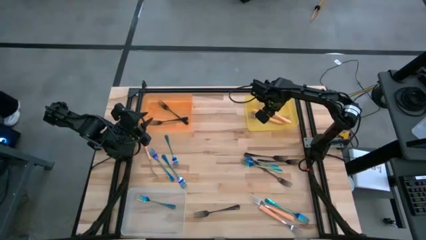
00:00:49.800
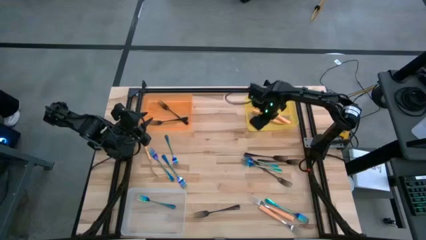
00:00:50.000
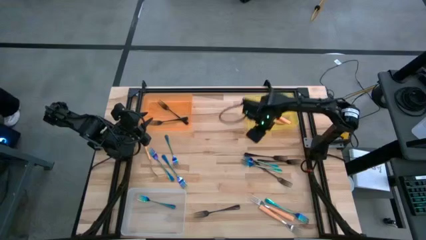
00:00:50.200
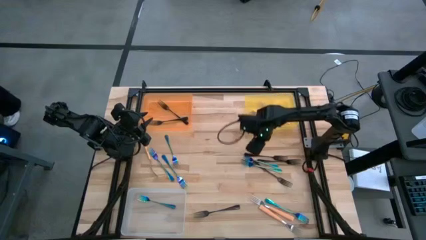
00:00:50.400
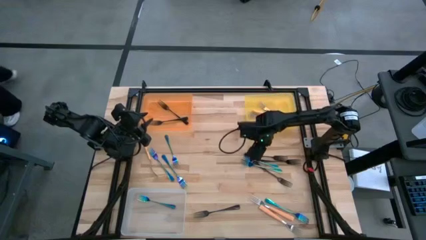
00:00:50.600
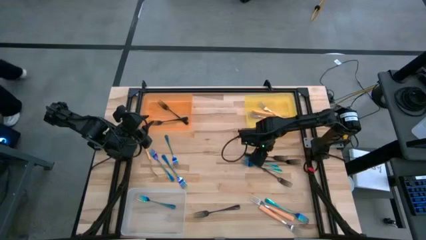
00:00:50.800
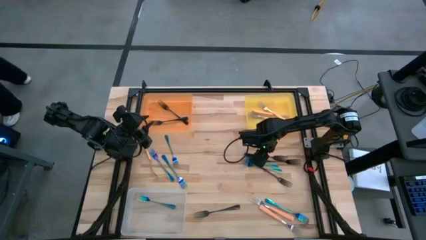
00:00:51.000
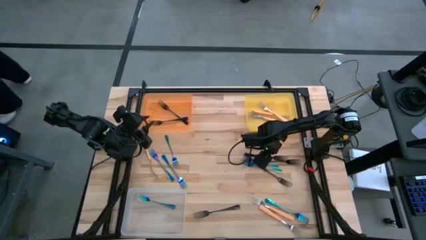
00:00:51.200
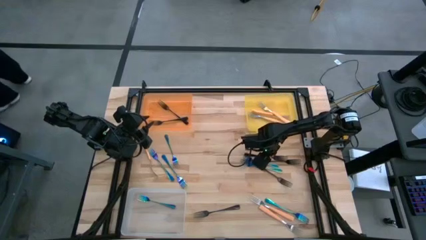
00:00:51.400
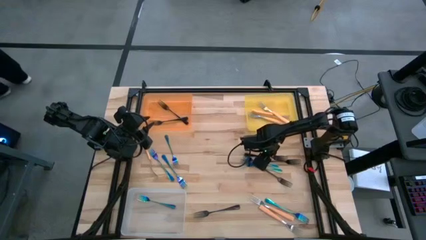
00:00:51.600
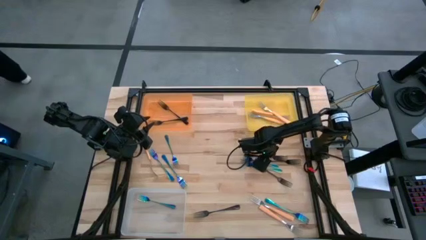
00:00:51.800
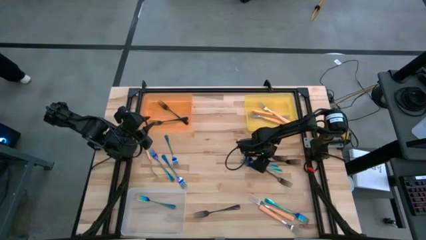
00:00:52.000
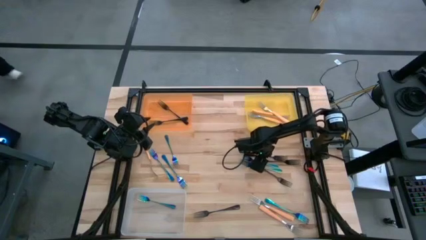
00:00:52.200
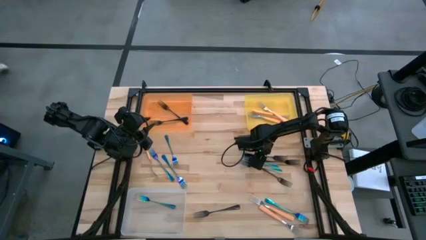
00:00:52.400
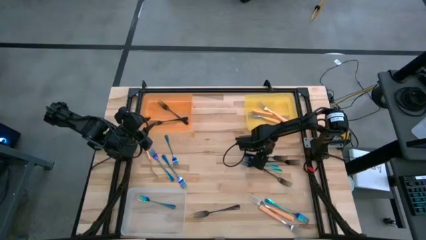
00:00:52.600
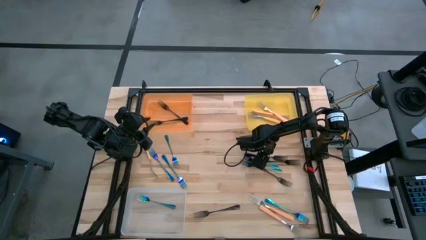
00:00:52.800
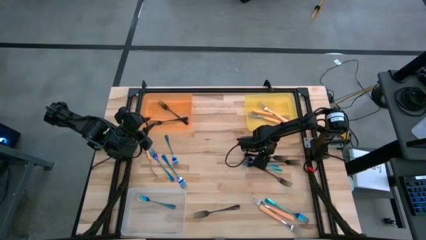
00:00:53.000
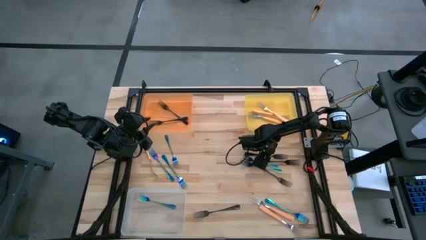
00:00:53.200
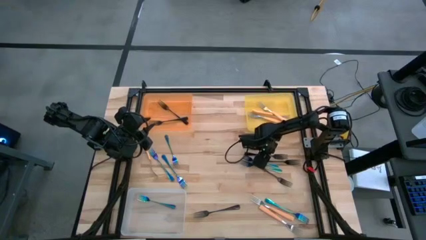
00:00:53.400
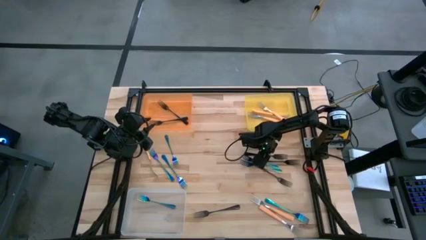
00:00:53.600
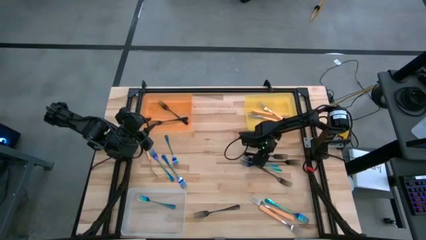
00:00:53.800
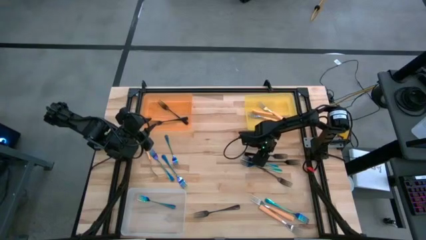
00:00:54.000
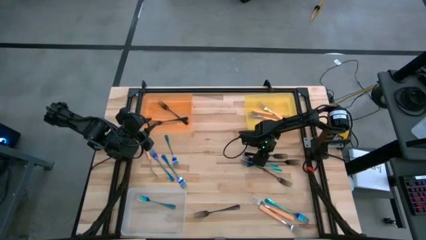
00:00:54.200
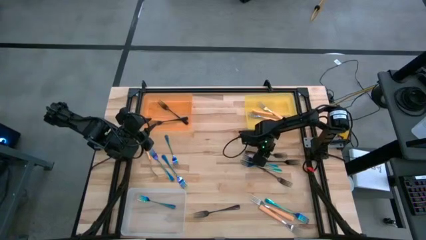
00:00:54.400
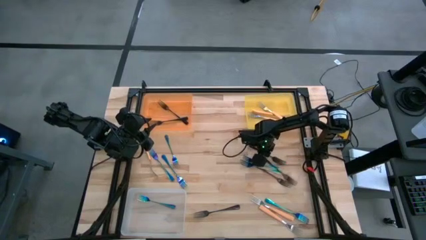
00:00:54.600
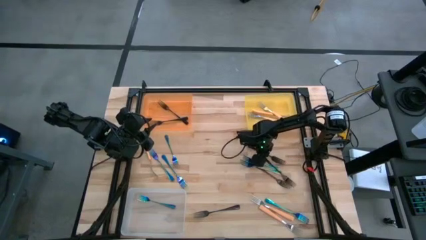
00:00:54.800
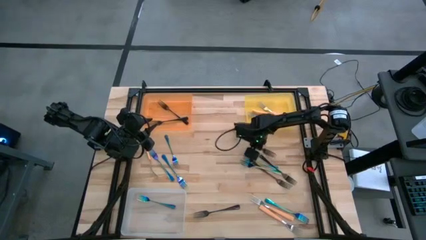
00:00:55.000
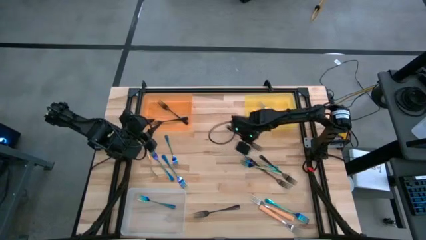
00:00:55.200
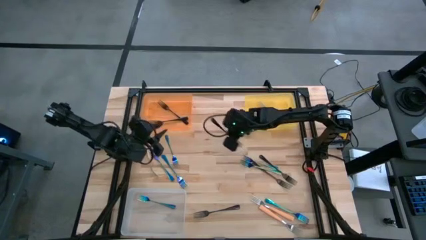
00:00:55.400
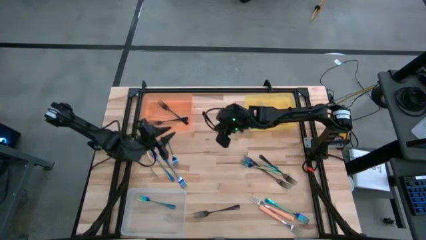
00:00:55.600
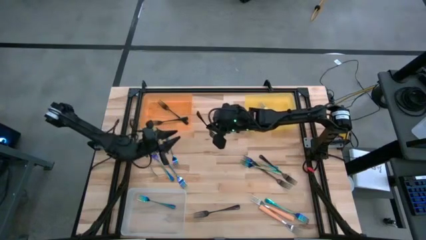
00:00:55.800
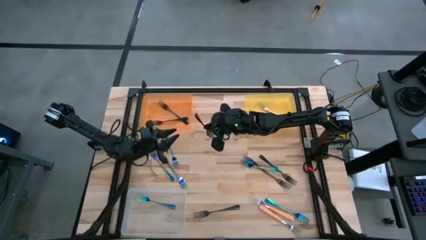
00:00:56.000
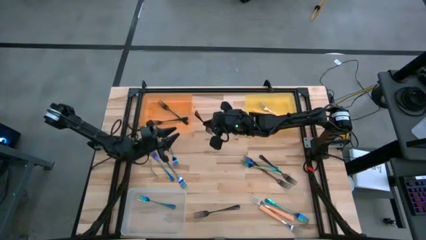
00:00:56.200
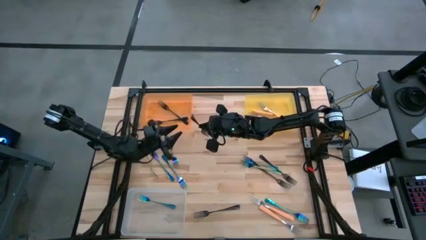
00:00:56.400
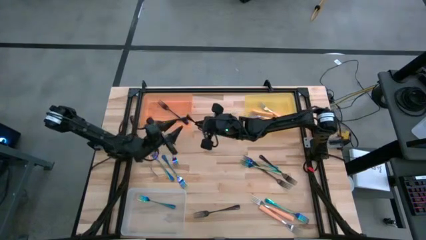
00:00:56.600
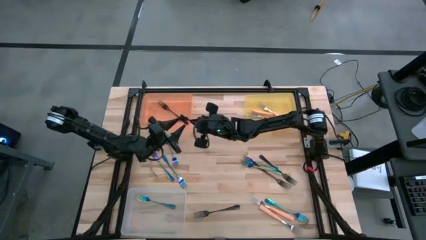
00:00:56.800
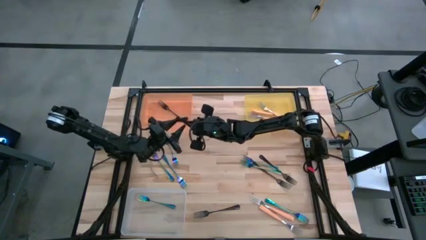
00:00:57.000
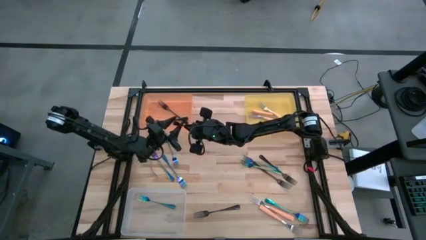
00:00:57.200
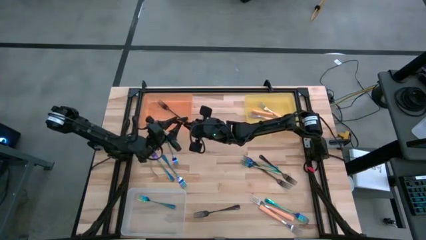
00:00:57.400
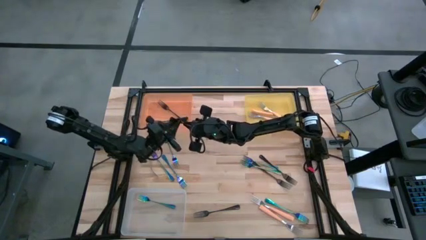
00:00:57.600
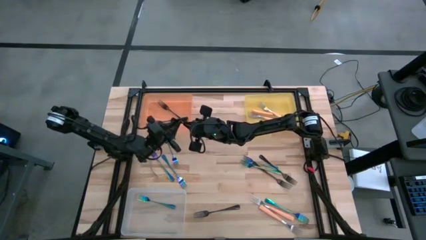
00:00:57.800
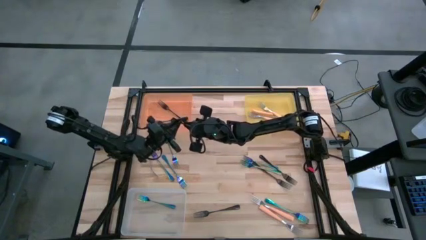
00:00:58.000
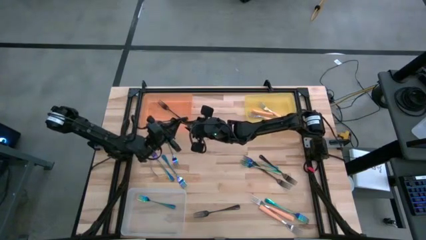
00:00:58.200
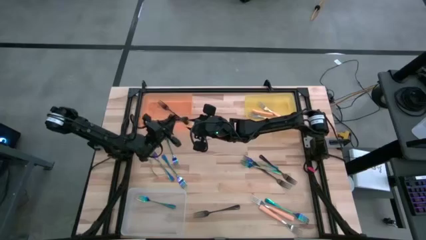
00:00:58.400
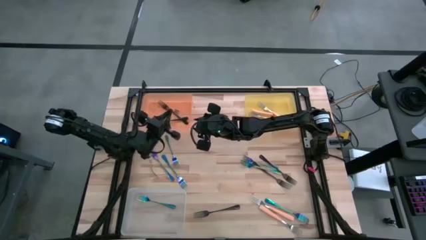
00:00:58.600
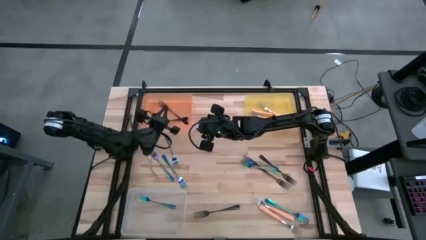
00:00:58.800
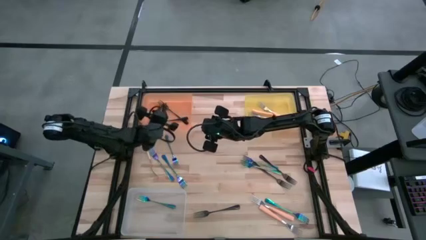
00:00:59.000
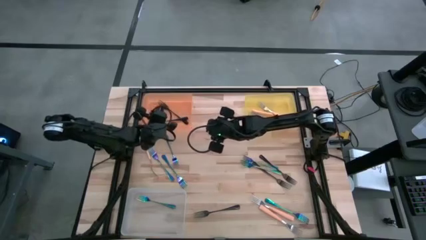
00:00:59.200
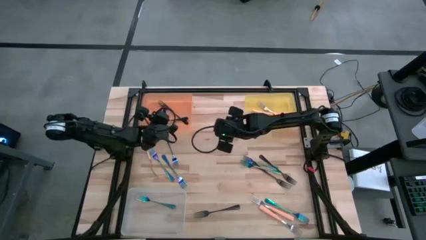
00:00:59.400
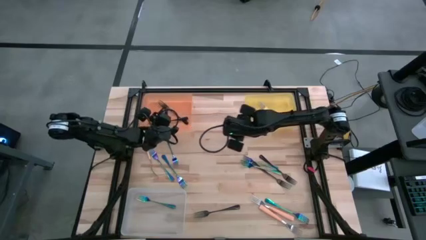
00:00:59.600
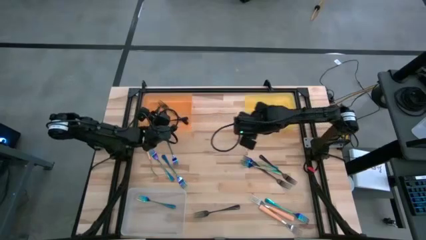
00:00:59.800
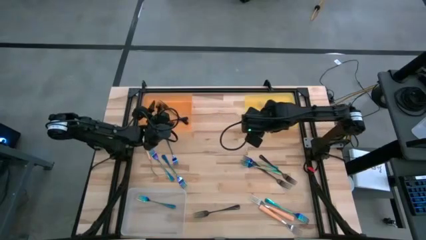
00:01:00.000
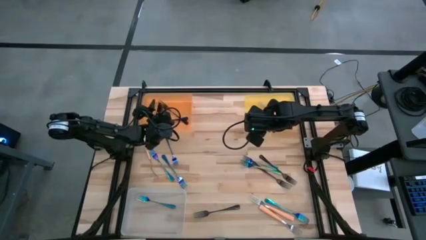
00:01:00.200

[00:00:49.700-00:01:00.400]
Task: Sort silverware by color (type)
Put the black fork into the orange bin

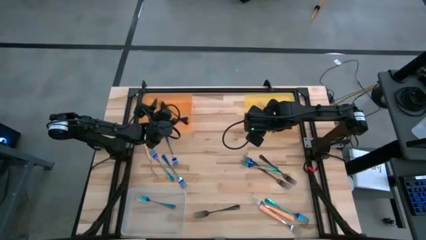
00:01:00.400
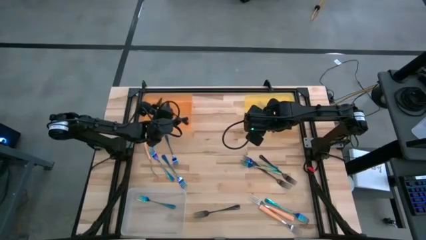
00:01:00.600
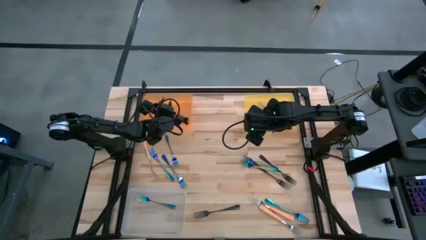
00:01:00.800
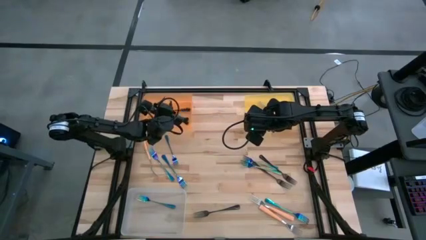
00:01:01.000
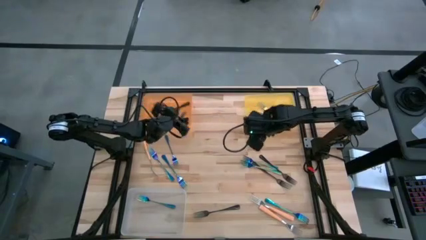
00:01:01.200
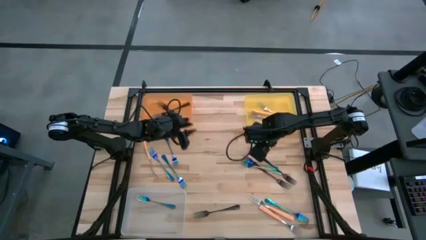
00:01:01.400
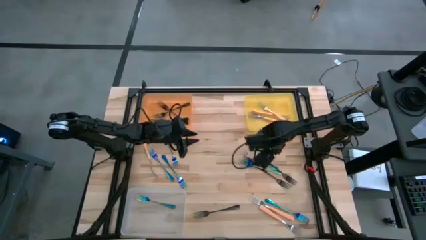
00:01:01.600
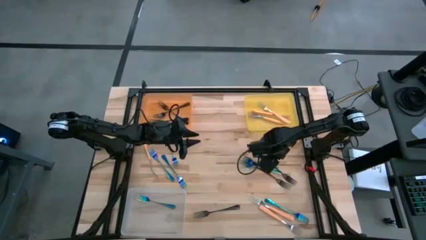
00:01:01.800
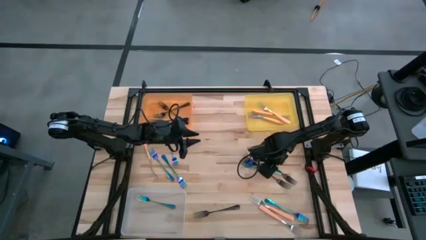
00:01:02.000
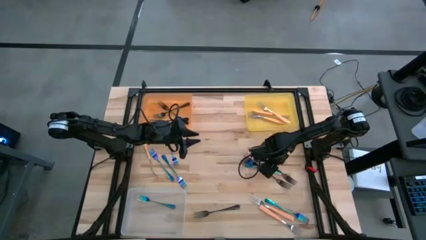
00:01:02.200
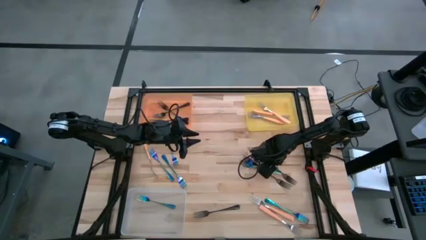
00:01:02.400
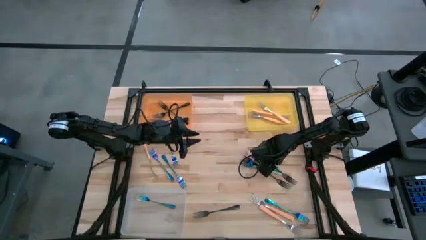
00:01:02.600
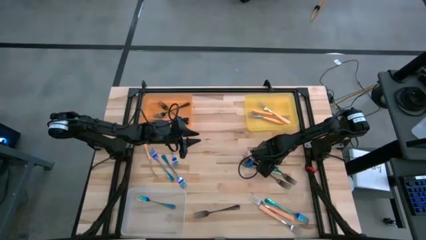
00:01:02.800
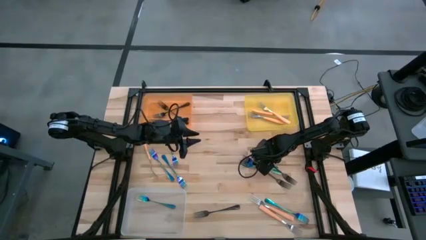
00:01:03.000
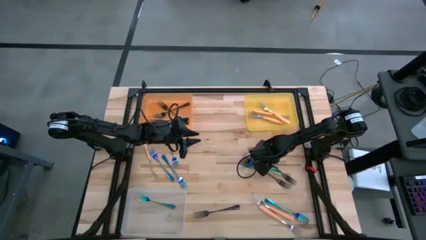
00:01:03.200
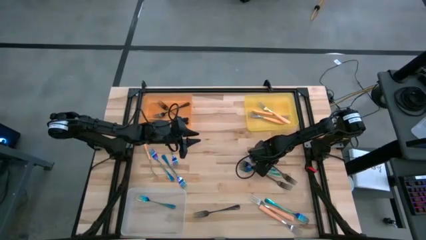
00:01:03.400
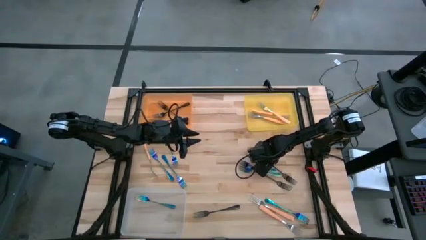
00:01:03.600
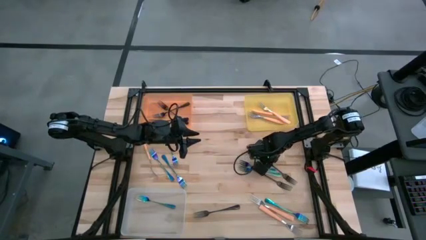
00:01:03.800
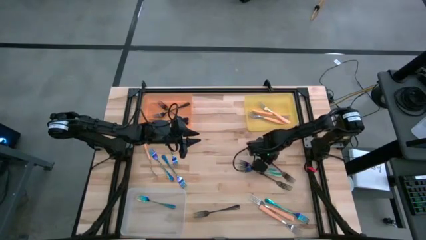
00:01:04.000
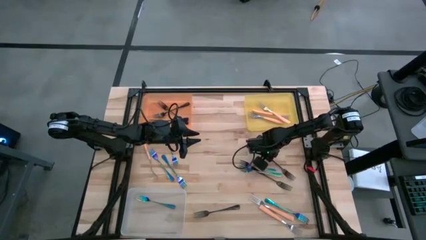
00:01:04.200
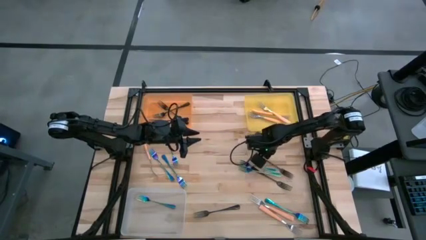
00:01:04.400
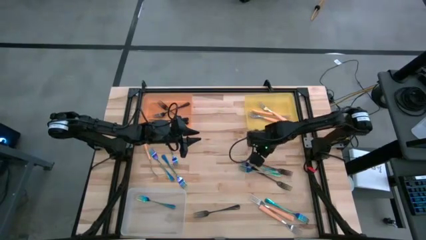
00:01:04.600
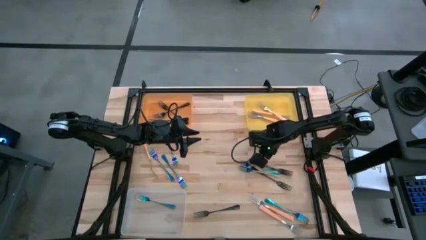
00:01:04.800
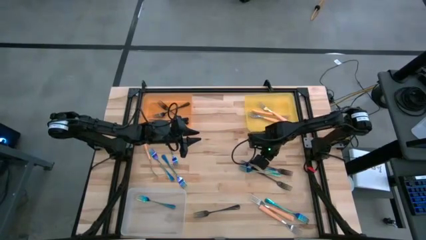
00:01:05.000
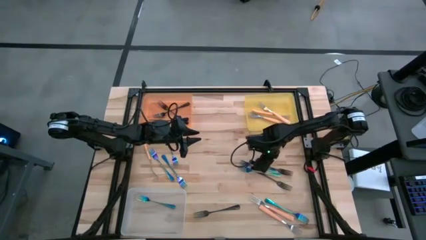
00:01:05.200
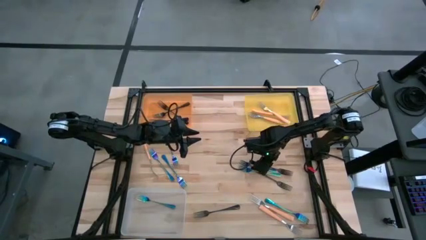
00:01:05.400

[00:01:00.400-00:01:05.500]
Put the black fork into the orange bin

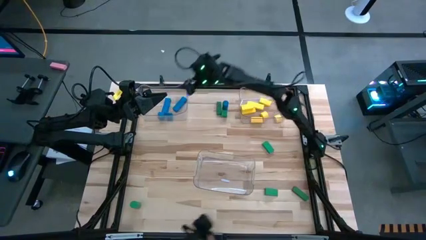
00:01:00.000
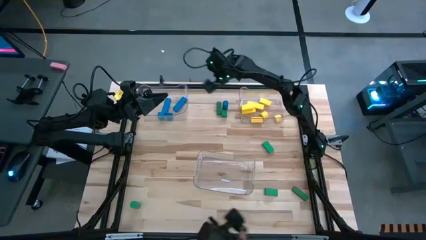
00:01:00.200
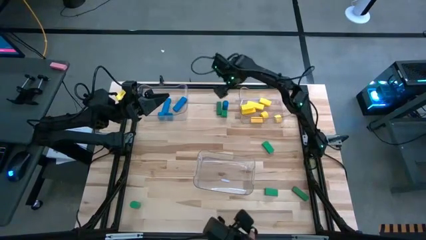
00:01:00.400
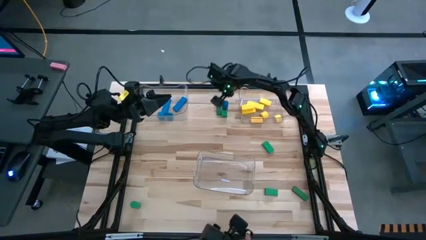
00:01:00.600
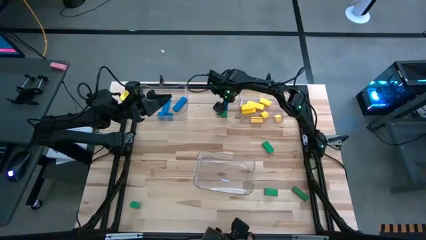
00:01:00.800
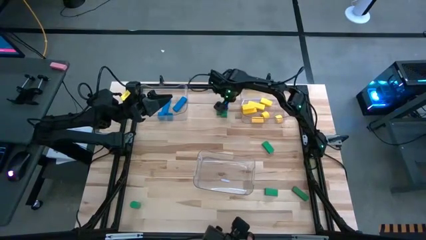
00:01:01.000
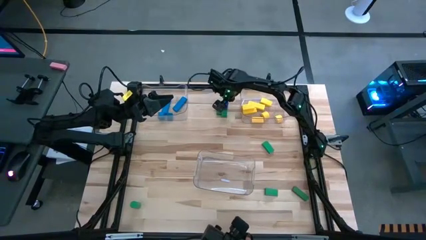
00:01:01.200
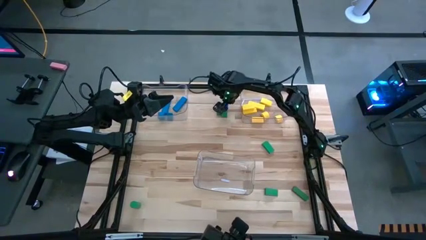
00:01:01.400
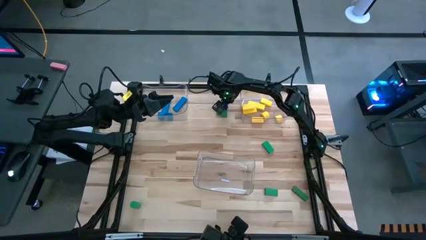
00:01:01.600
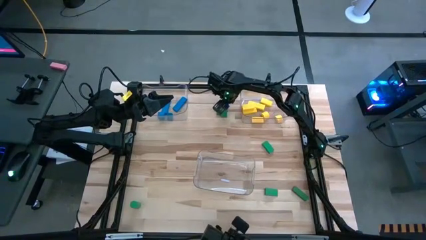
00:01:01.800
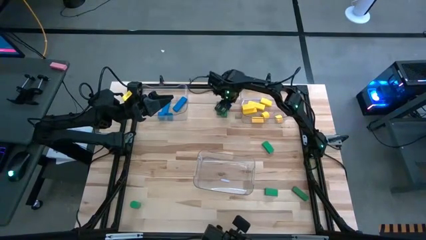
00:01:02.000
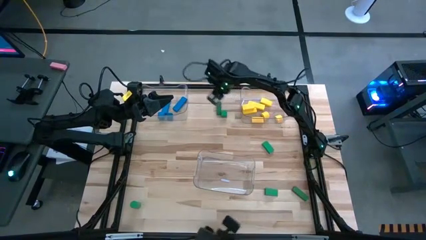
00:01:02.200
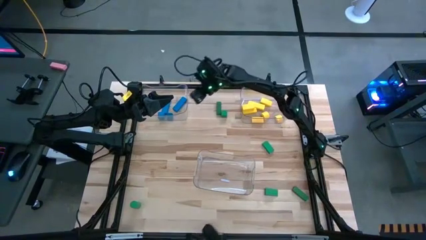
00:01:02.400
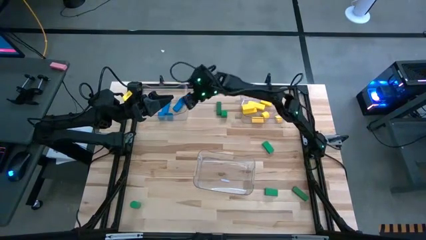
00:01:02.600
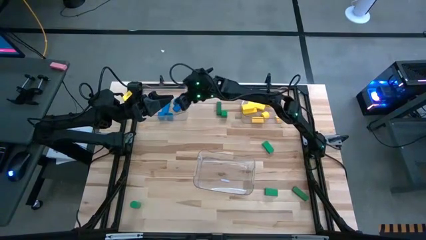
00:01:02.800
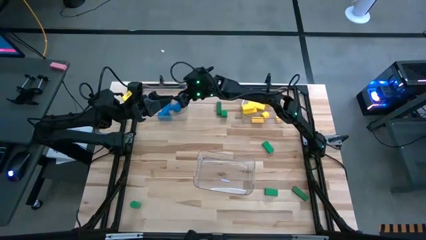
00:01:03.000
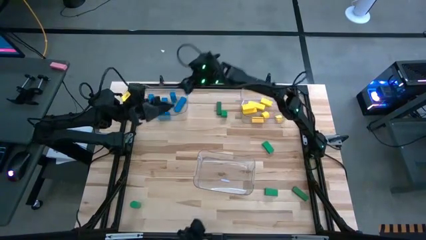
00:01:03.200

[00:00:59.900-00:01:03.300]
Task: Sort blocks
Put the blue block into the left transparent bin
